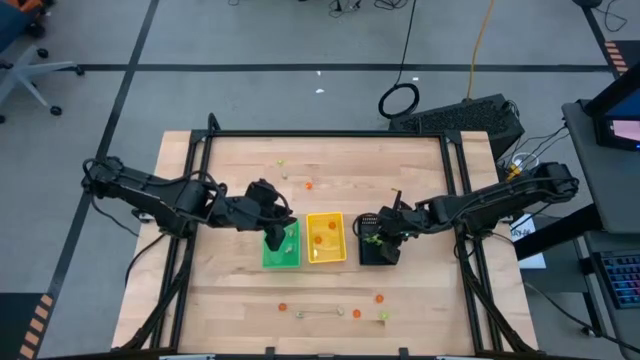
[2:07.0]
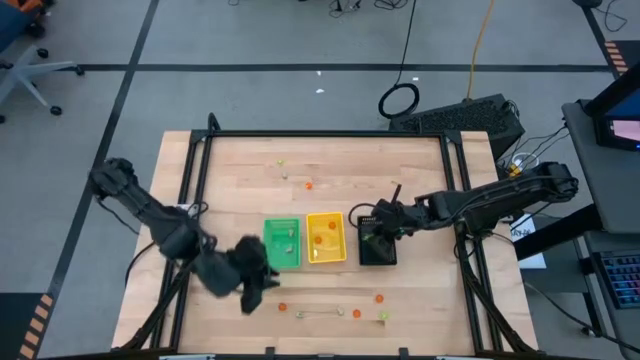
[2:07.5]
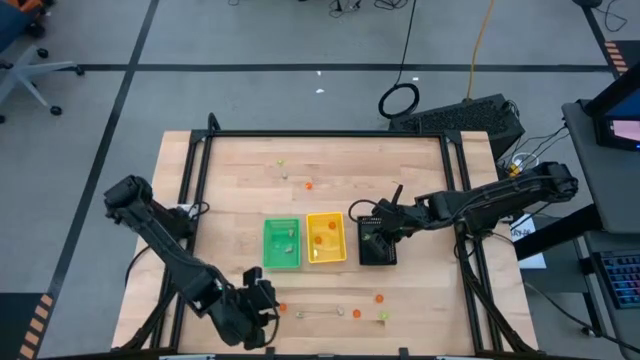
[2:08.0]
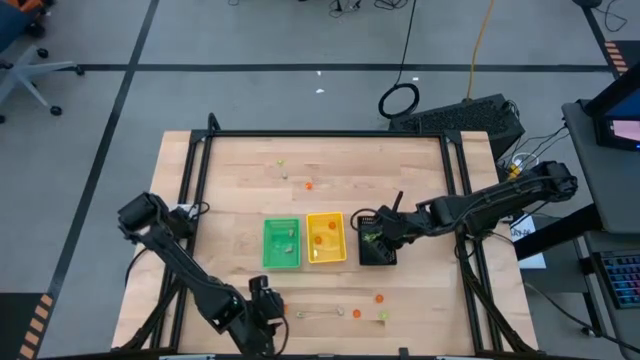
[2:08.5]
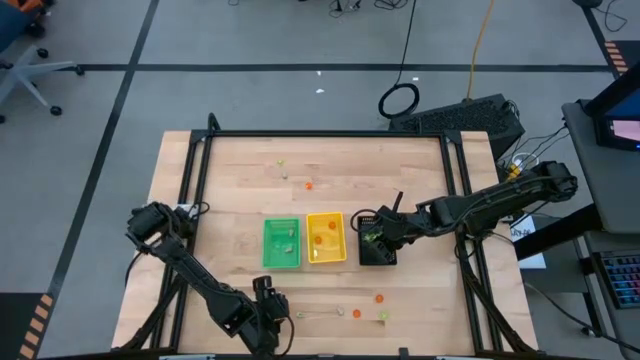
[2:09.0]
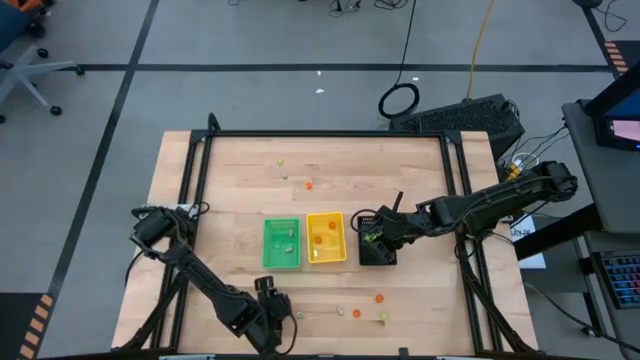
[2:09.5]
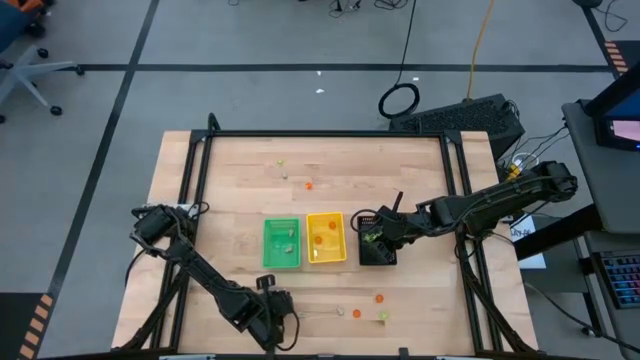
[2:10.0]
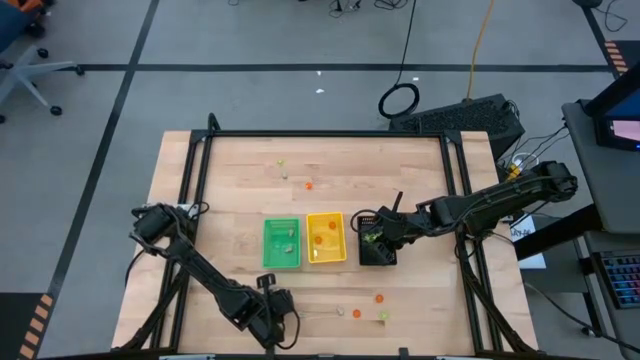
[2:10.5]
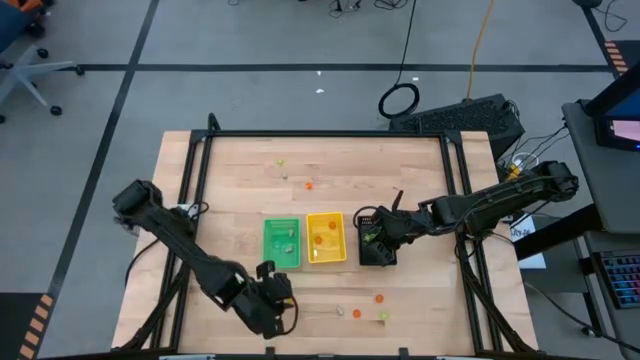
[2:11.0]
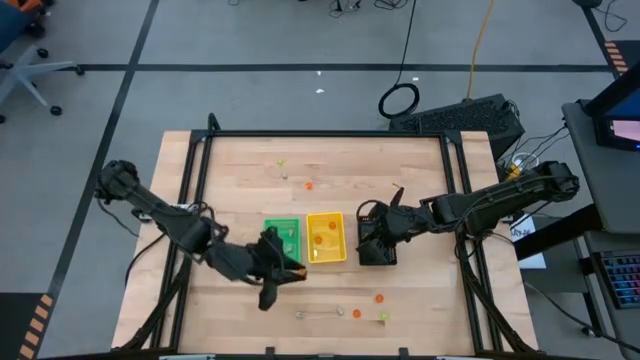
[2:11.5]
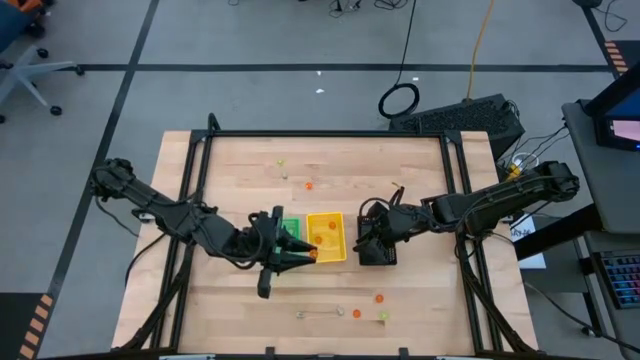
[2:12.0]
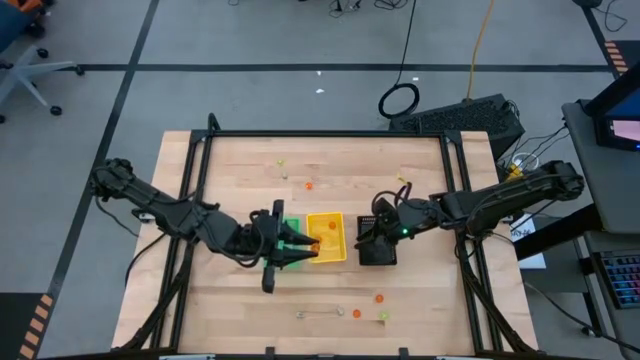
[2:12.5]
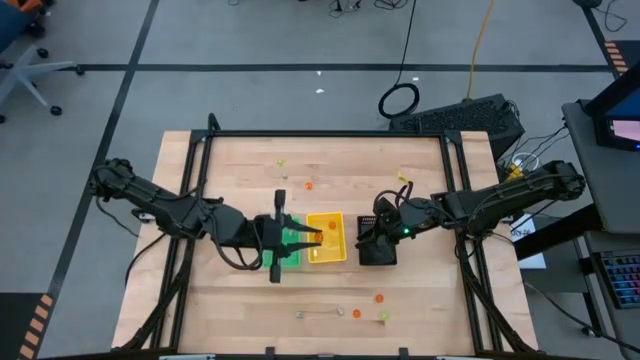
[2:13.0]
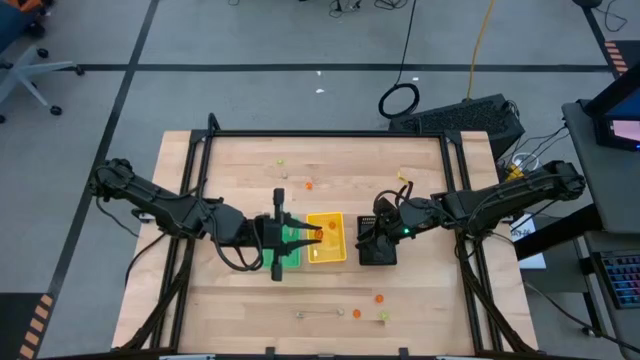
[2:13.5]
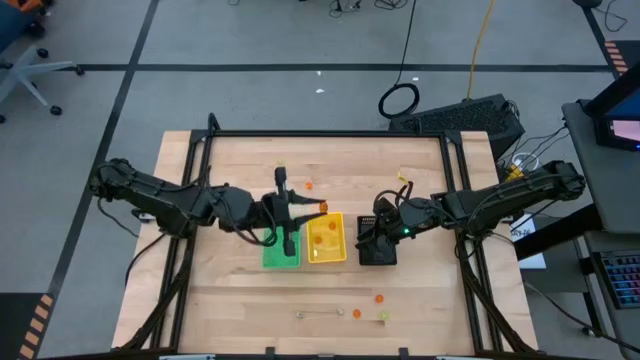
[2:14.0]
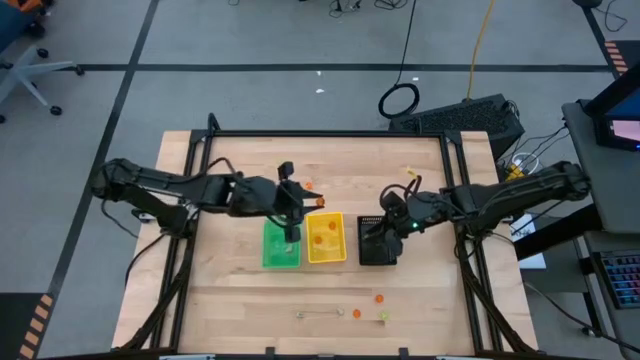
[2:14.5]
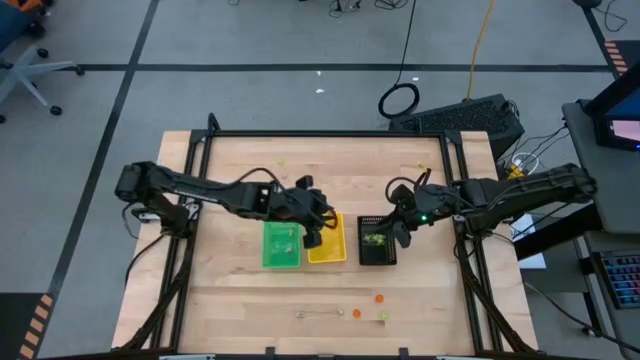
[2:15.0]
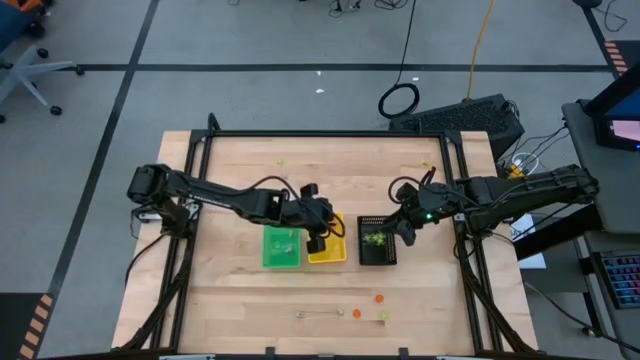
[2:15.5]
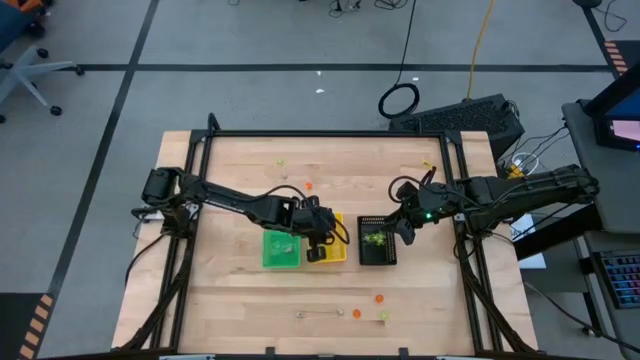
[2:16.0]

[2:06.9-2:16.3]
Task: Sort Halloween decoration
Put the orange pumpkin toy into the yellow basket

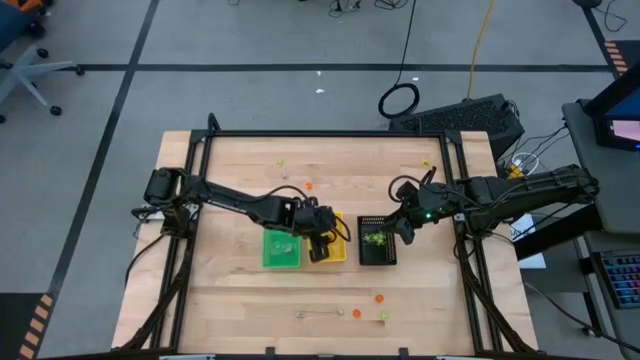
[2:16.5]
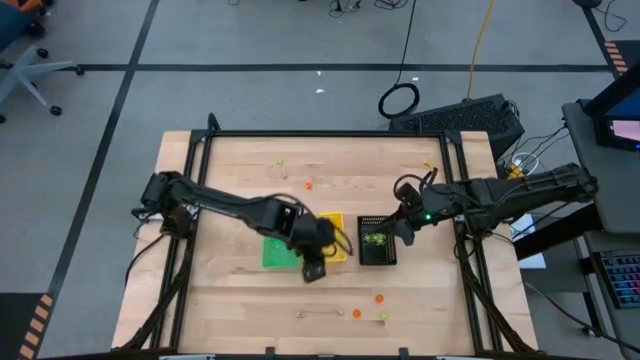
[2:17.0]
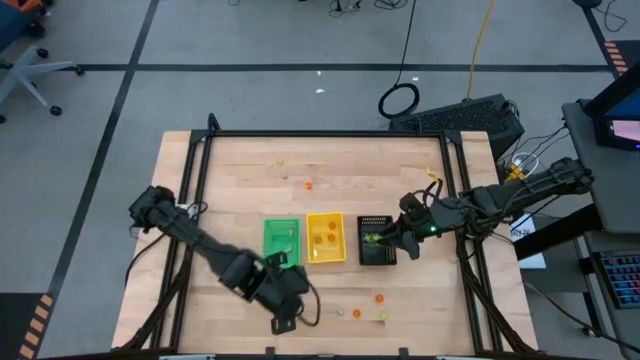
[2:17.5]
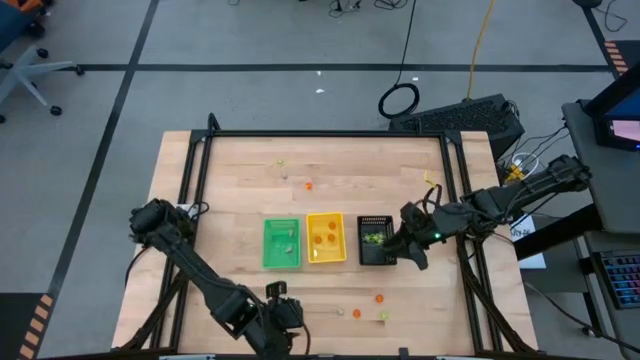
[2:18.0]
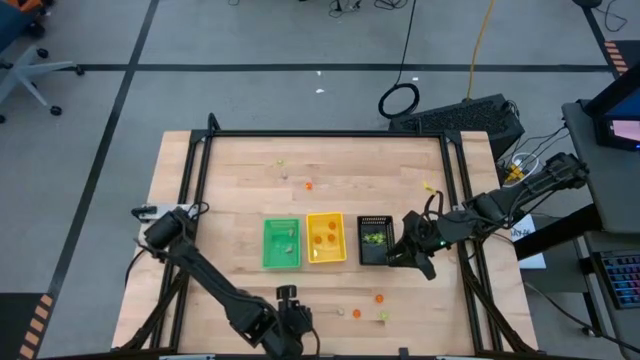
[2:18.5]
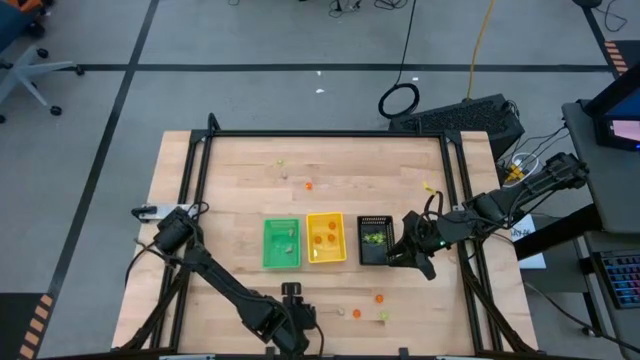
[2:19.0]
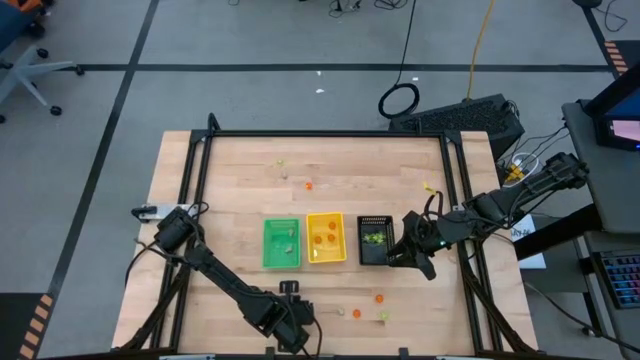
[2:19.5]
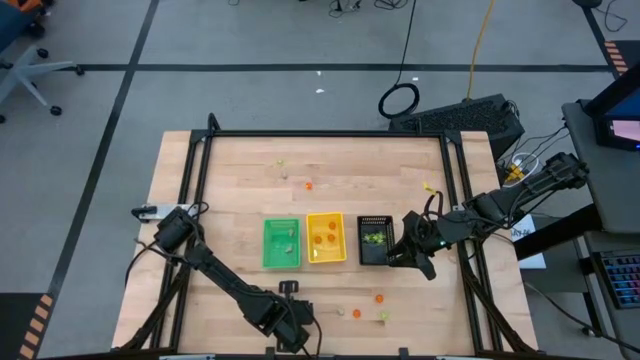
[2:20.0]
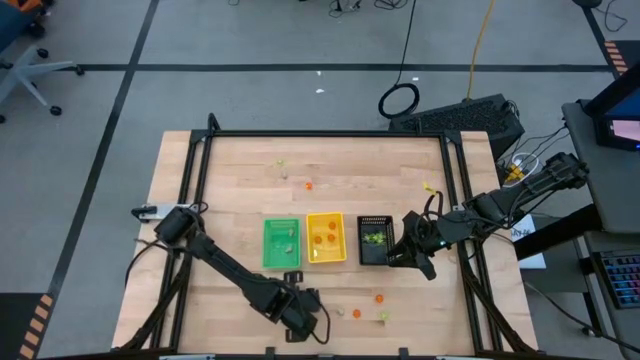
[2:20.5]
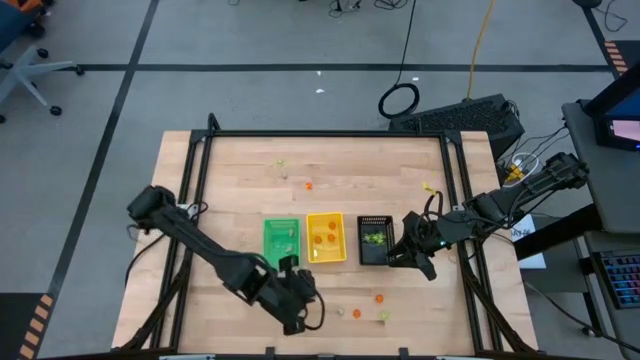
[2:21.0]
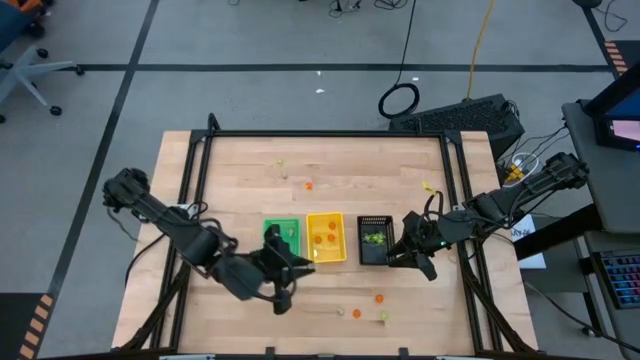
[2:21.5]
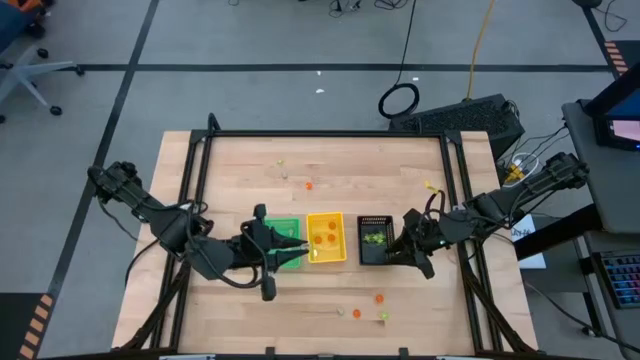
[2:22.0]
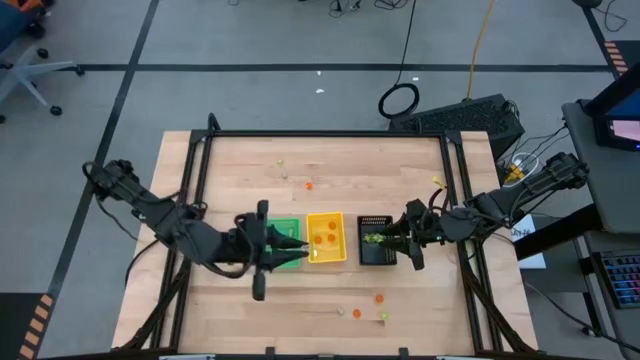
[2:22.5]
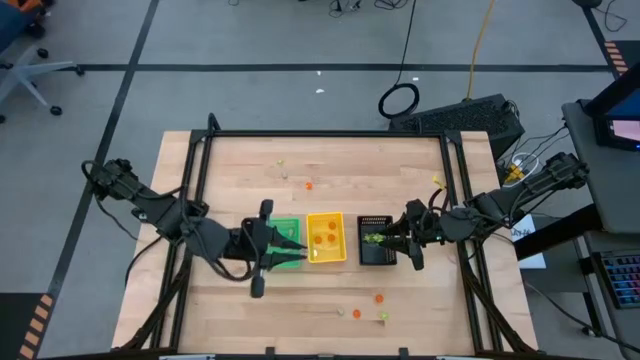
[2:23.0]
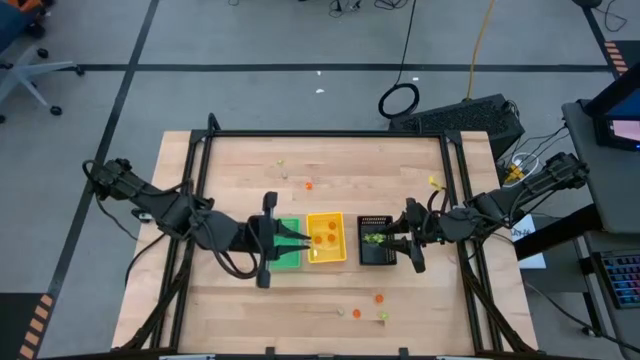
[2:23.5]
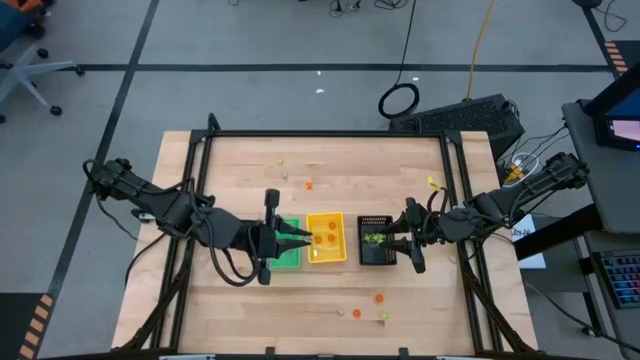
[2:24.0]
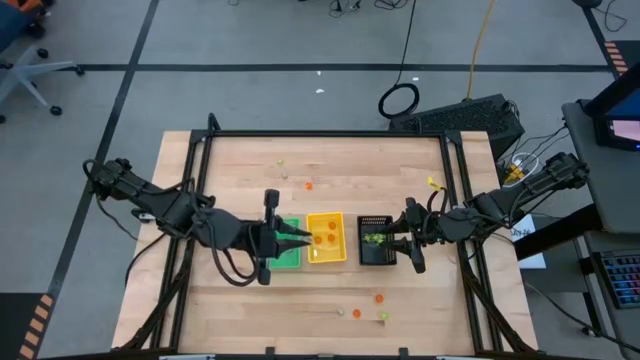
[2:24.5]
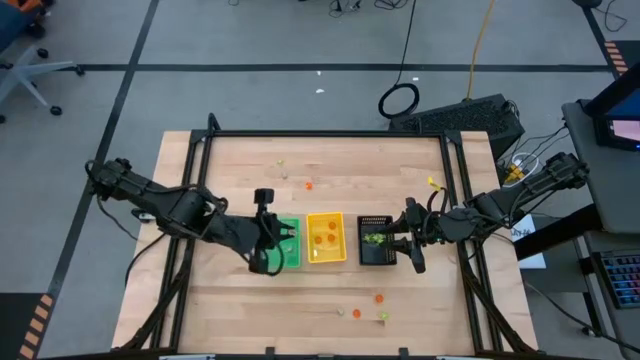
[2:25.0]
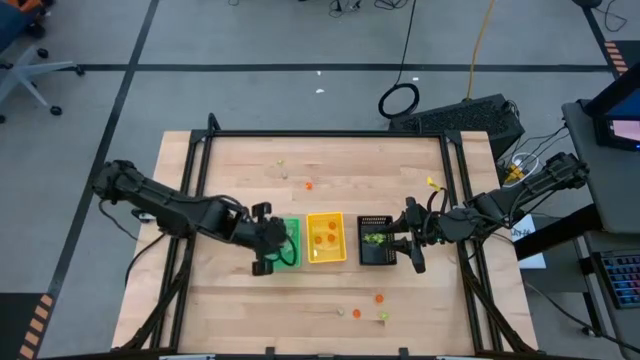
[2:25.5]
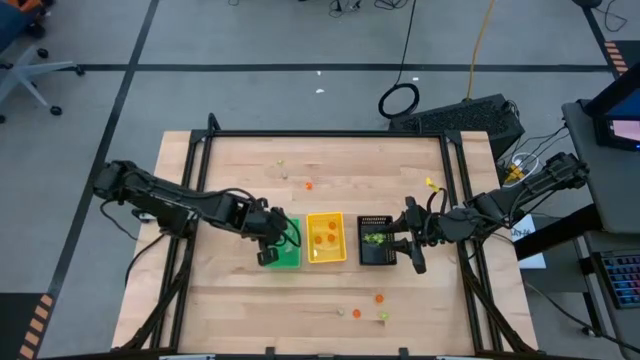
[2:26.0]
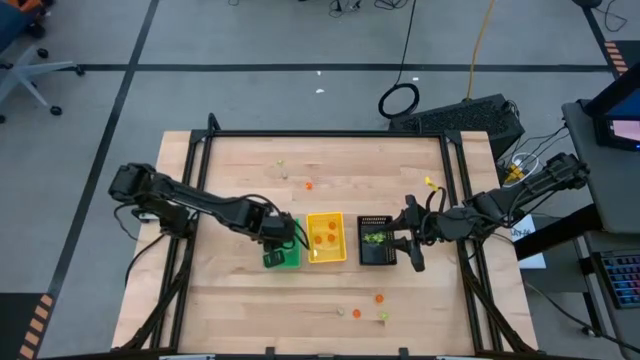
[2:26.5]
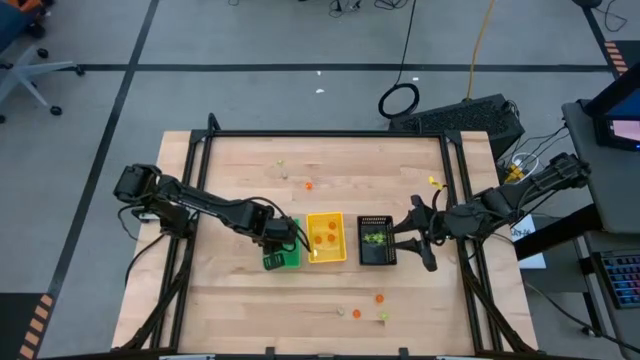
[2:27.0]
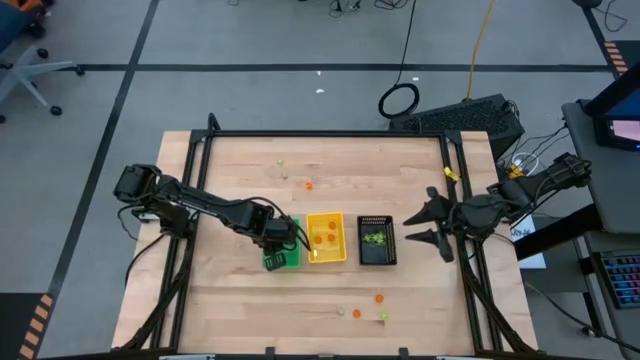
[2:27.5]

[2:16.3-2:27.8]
Put the white skull toy into the green basket
